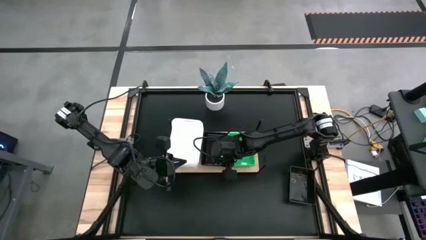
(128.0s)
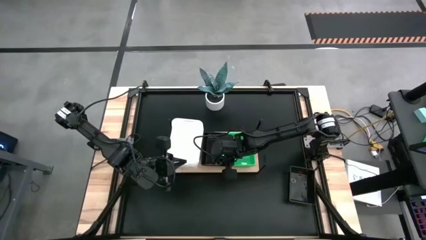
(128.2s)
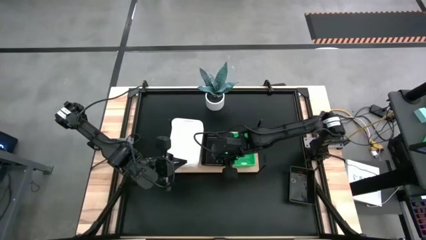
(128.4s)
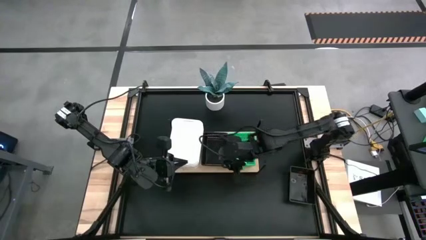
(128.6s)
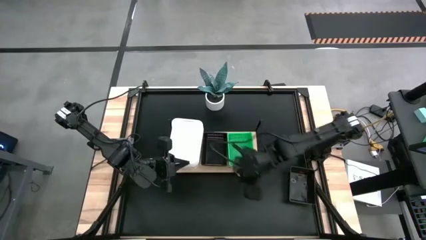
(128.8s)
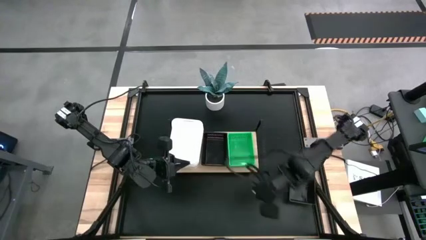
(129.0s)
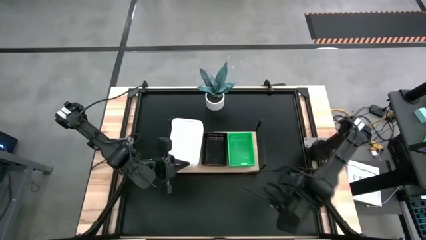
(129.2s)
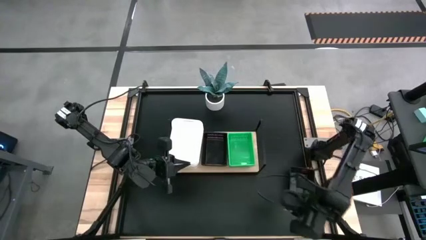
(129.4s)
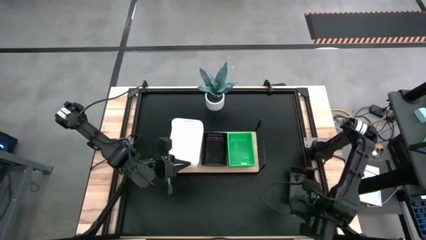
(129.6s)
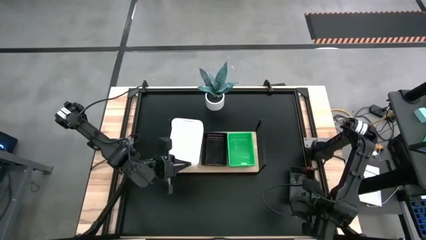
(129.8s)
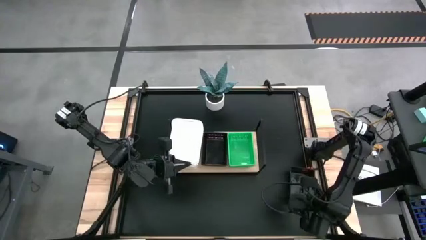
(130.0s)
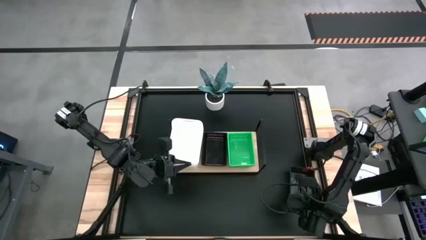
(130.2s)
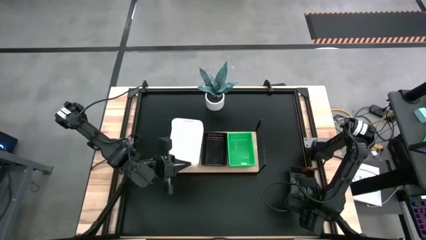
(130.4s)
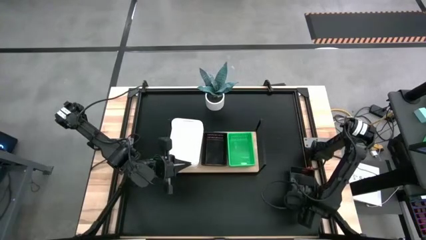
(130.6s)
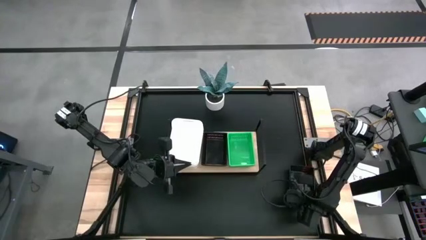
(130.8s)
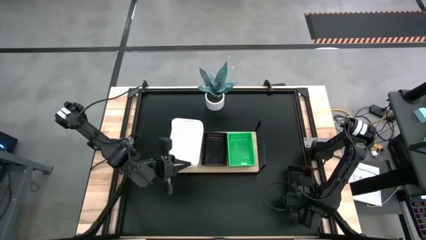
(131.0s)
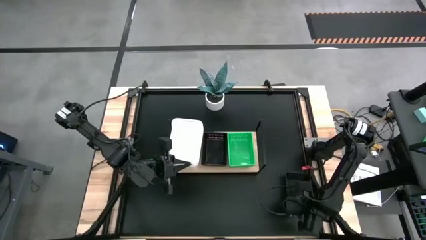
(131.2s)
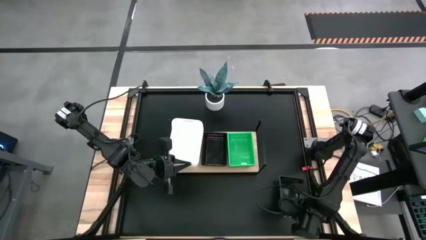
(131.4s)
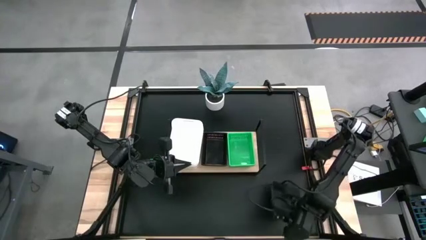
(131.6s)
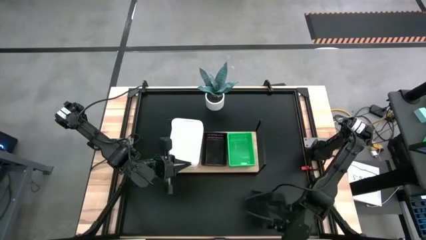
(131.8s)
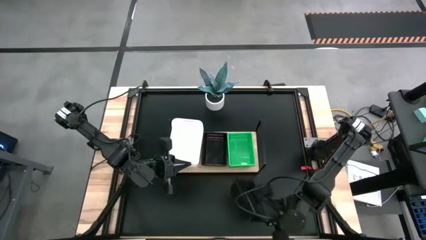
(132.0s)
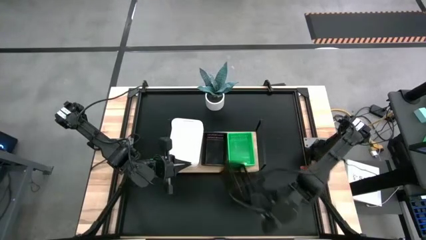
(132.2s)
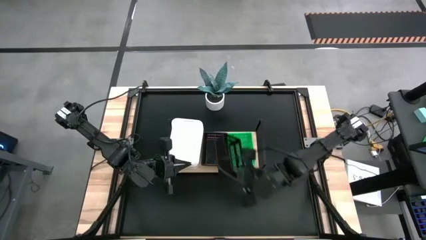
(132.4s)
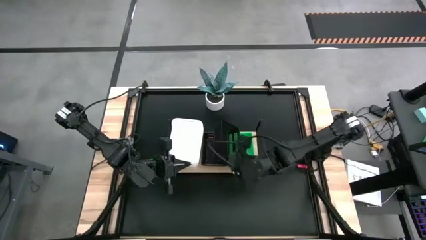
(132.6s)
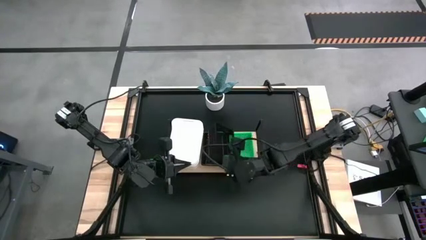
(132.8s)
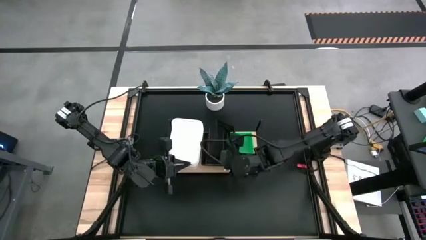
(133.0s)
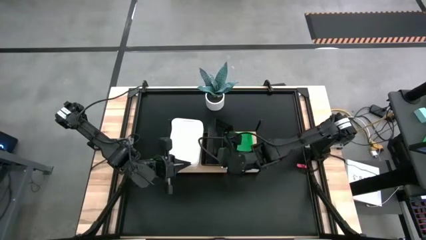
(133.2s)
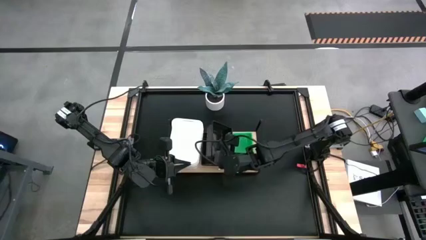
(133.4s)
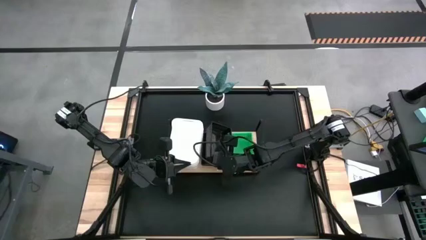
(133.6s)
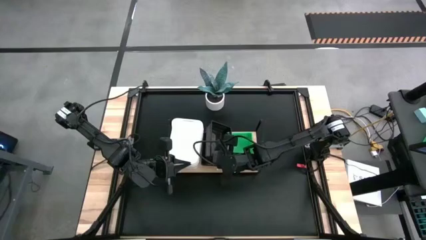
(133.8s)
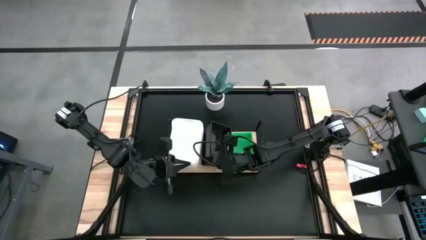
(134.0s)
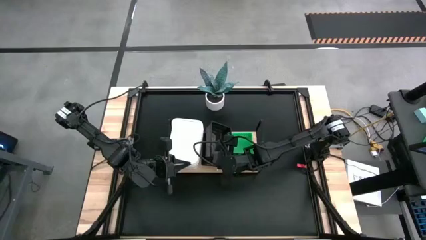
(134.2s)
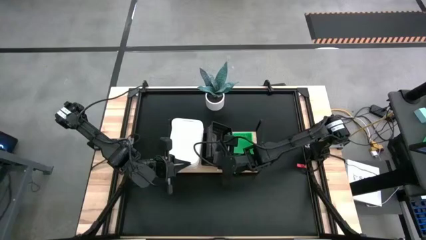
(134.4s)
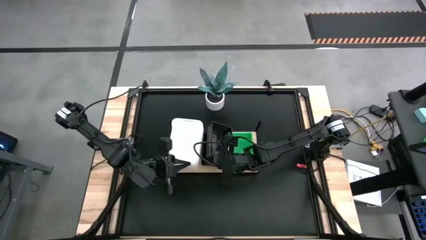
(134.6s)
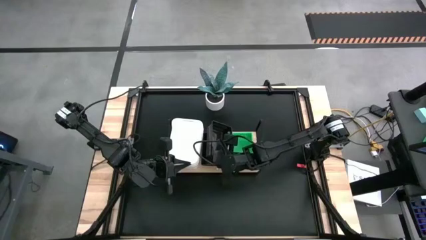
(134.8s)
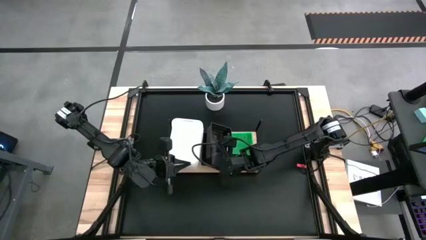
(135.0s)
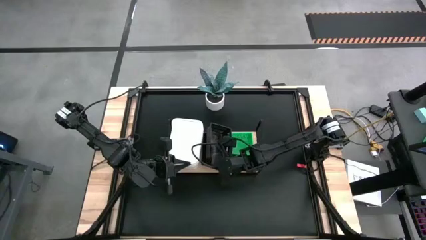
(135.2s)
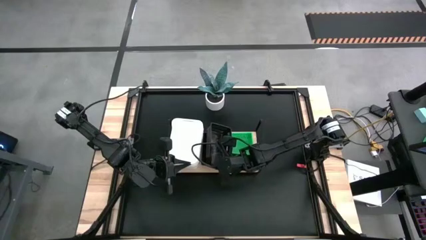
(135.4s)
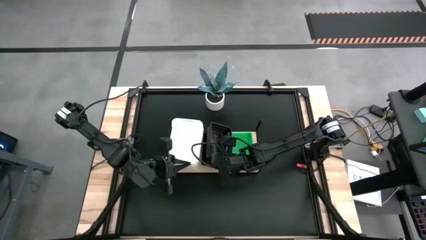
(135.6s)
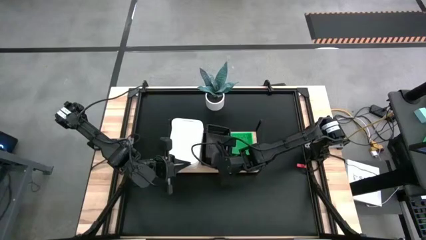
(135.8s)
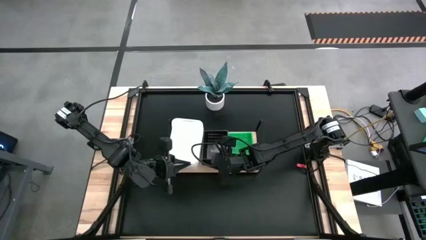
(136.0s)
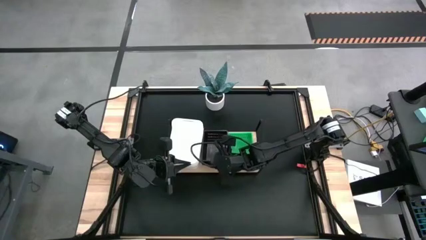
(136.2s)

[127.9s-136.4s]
Task: Stack baskets on shelf by color
Stack the black bin on the top of the other black bins on the shelf

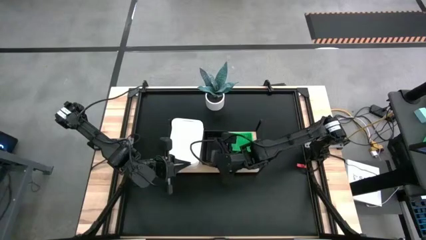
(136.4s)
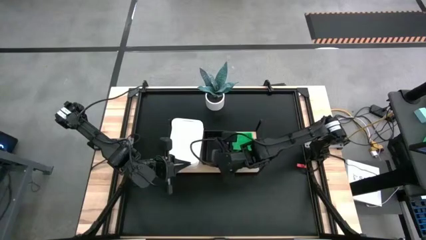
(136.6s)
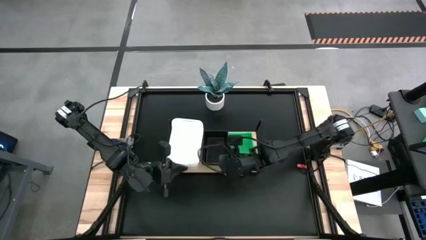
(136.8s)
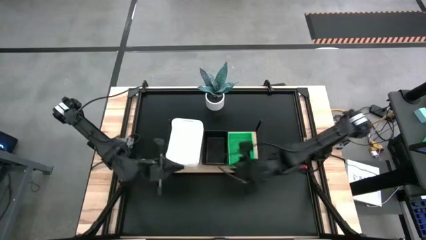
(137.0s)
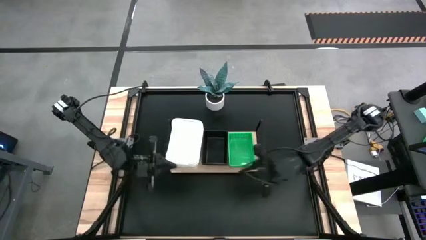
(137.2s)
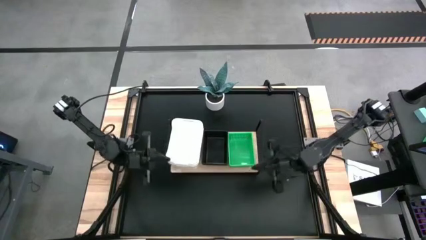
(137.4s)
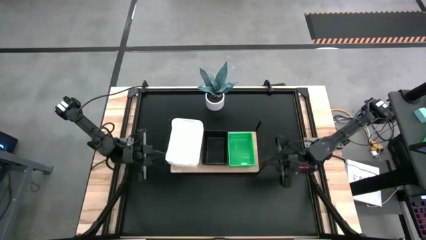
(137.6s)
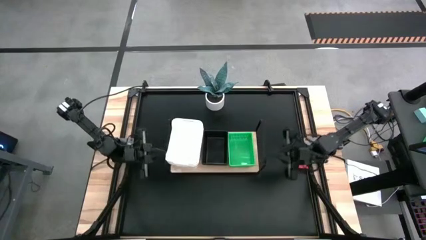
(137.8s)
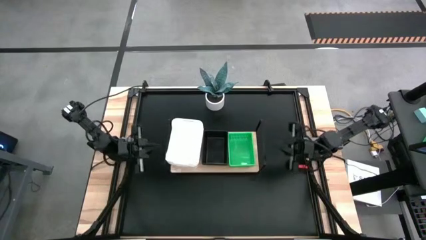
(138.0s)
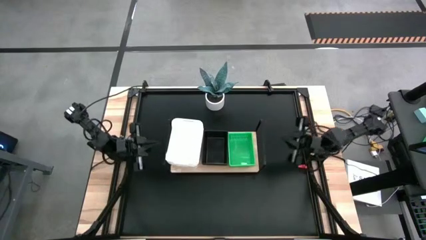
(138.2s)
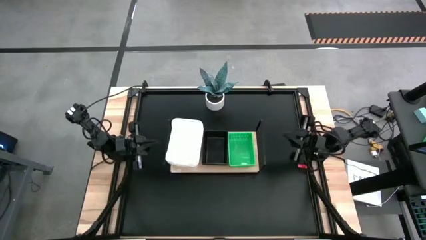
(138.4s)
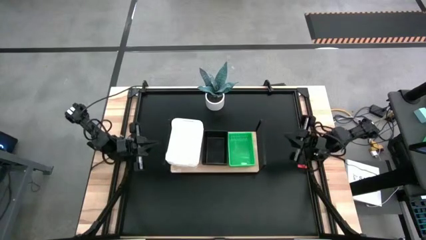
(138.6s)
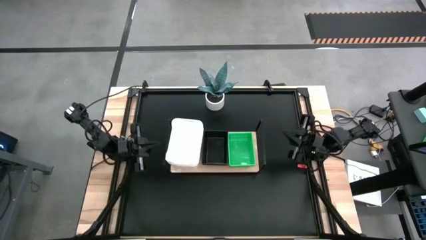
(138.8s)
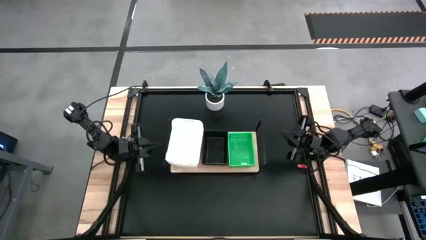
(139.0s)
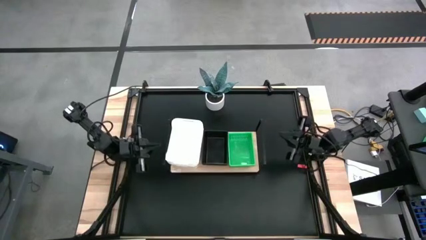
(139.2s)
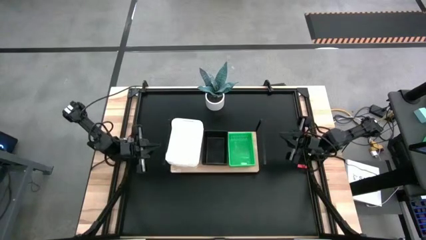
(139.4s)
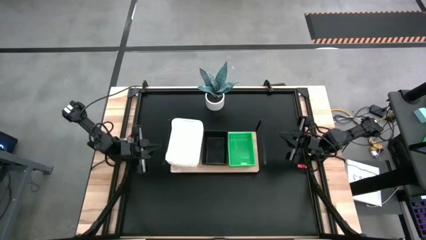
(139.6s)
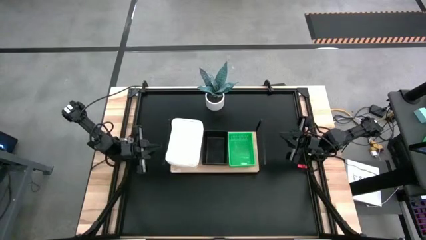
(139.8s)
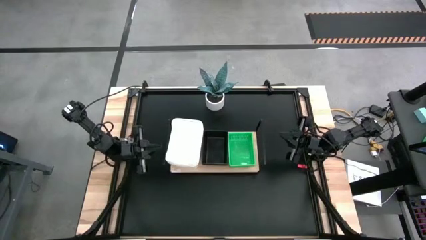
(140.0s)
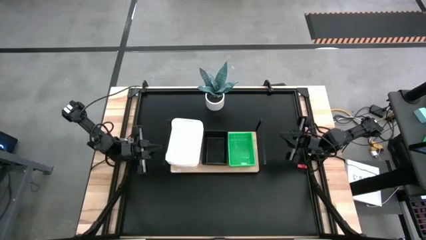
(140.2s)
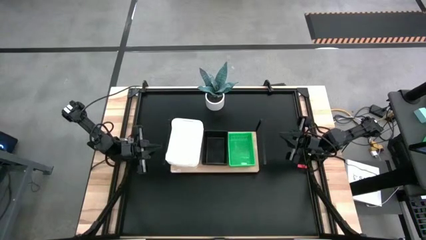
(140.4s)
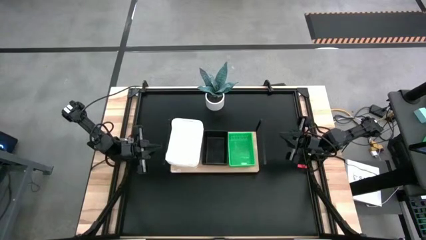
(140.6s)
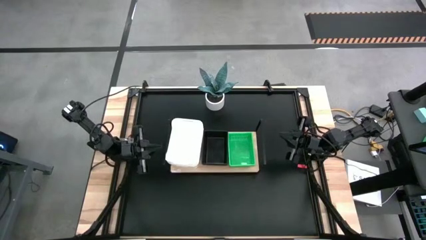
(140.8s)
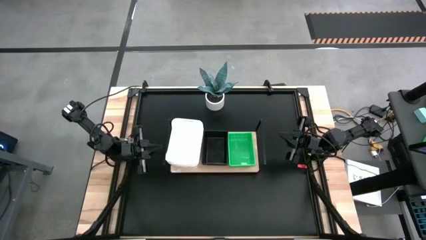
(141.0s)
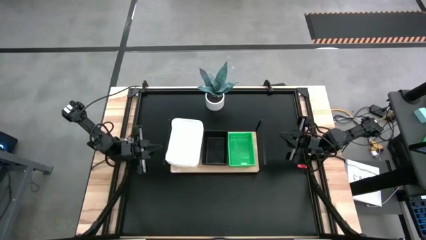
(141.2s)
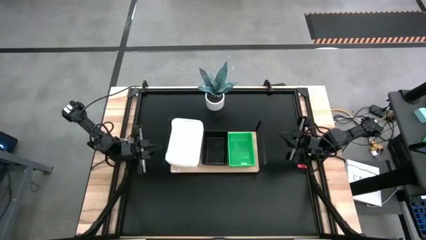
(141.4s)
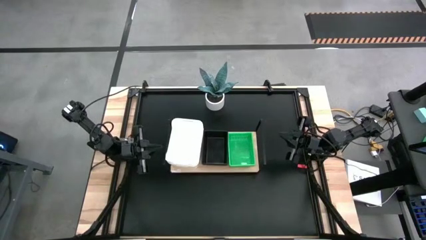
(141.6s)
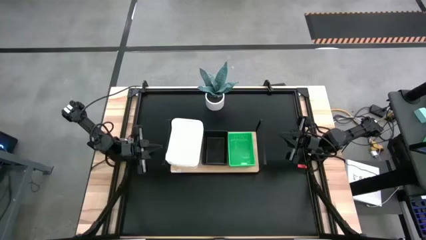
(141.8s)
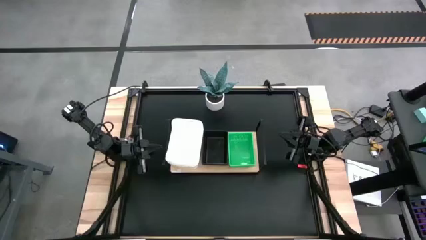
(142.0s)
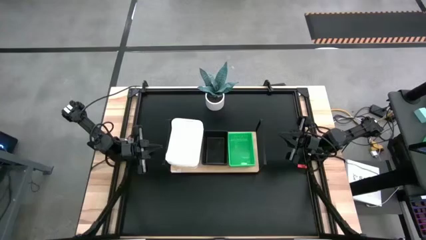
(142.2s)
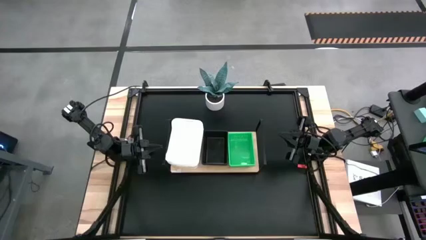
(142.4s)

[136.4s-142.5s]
Return to Home Position

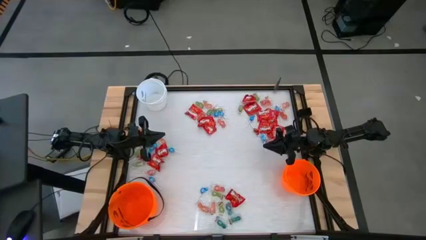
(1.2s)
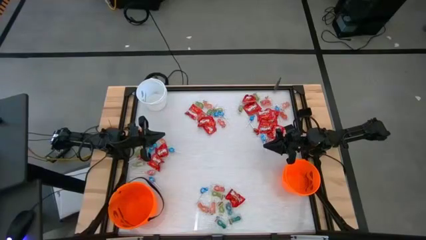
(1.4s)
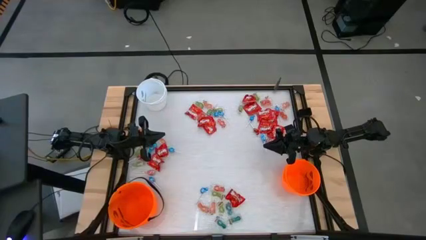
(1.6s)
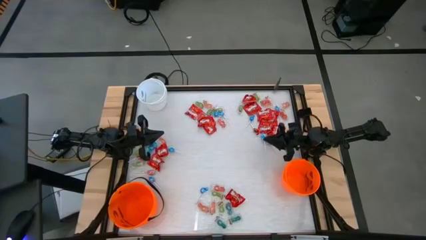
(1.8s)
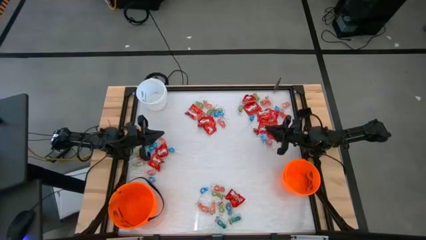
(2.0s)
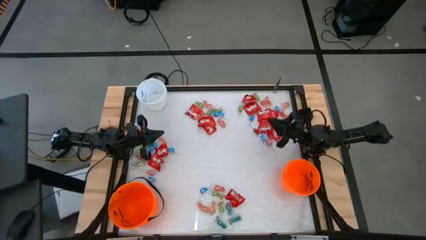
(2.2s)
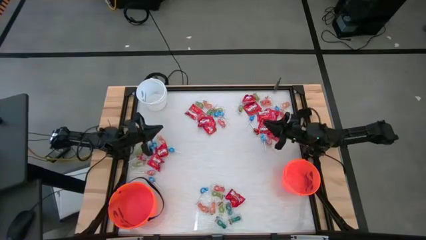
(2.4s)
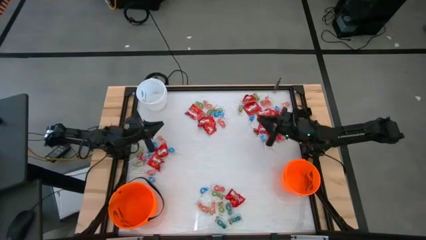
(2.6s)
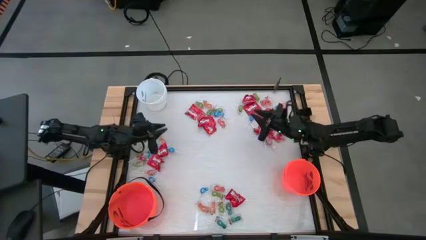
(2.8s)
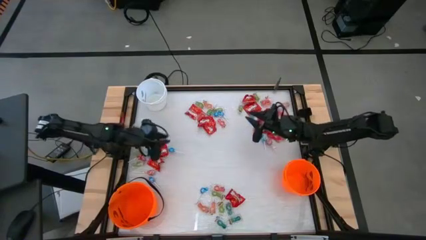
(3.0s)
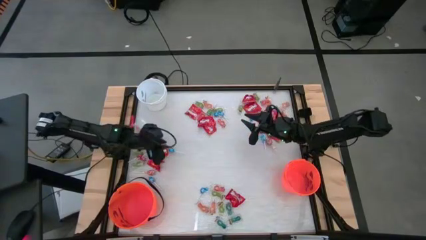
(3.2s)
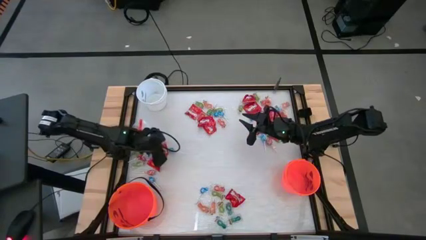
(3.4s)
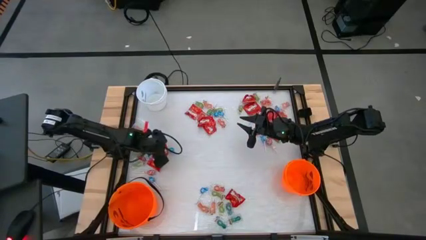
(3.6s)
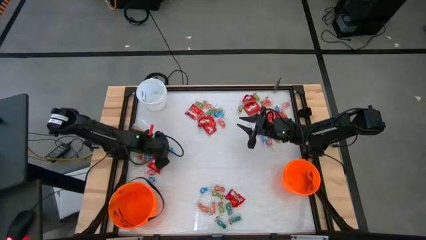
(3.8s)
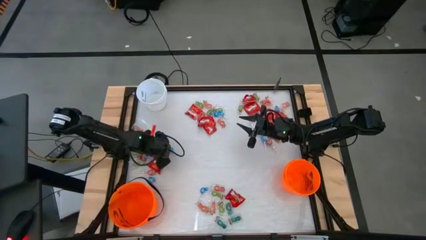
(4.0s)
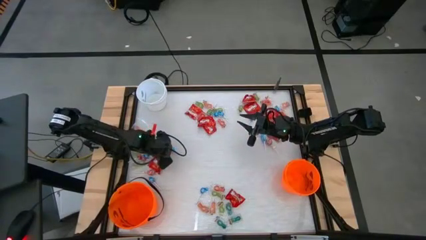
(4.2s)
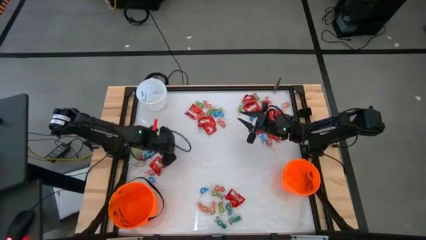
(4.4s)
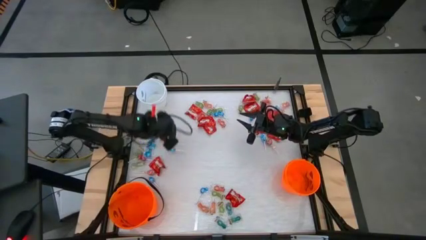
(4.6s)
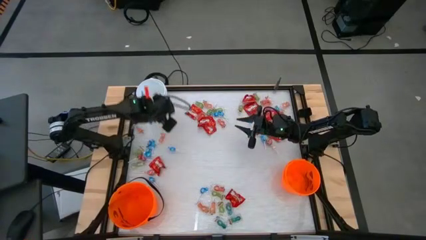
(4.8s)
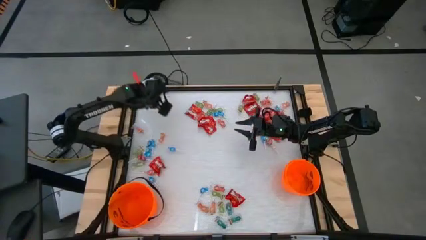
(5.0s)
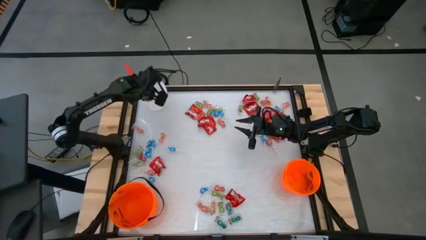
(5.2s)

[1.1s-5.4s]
Task: Sort candy by brand, put in halloween buckets
Put the skittles into the white bucket
